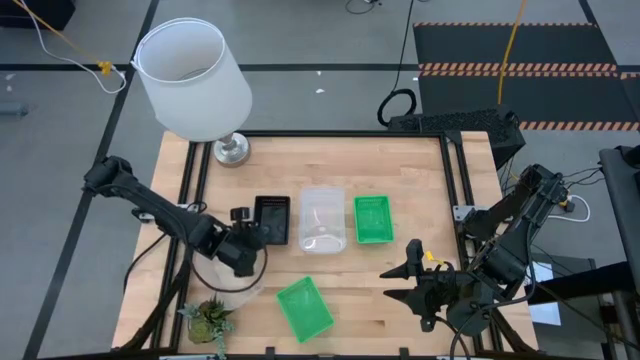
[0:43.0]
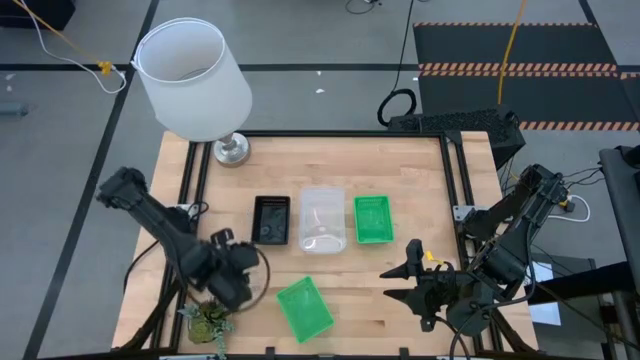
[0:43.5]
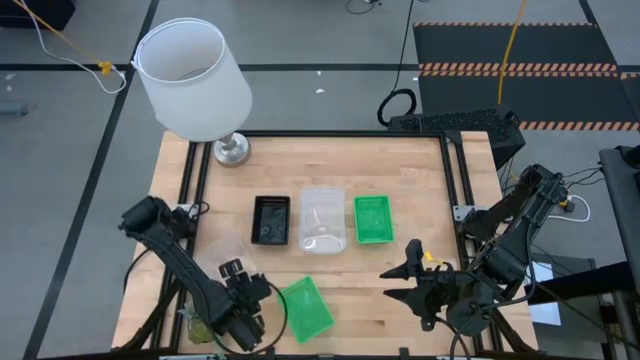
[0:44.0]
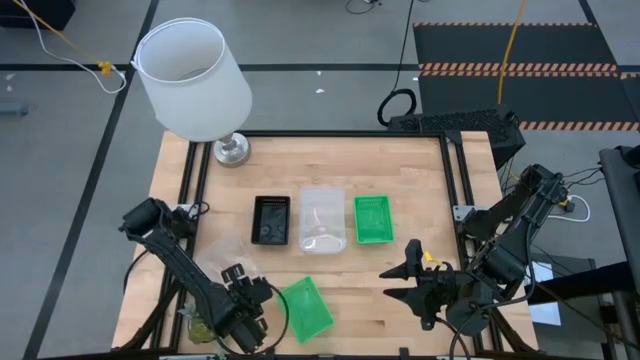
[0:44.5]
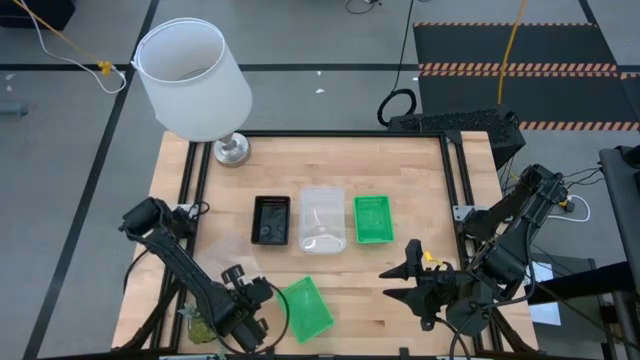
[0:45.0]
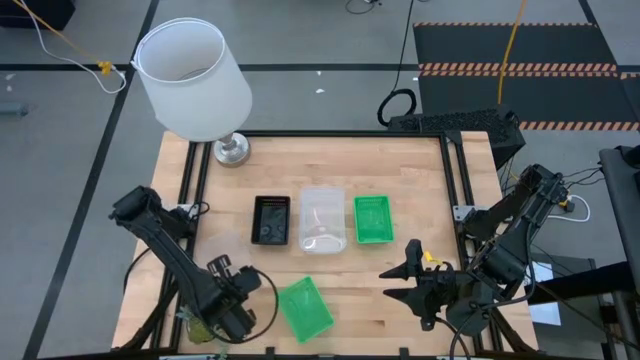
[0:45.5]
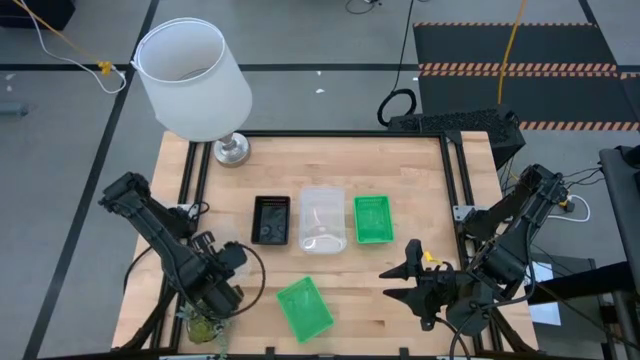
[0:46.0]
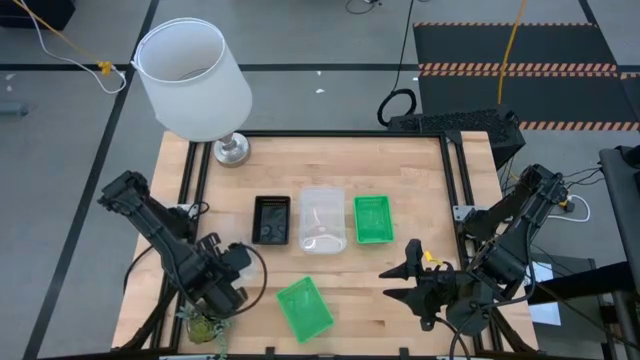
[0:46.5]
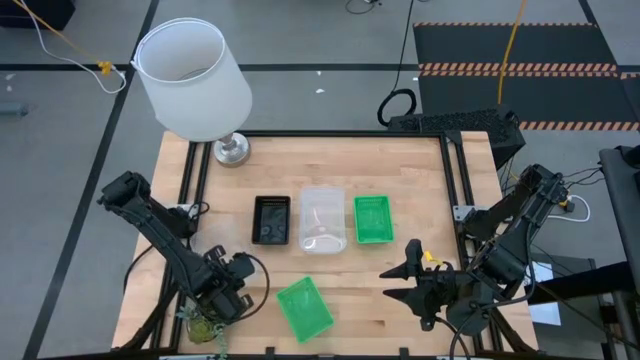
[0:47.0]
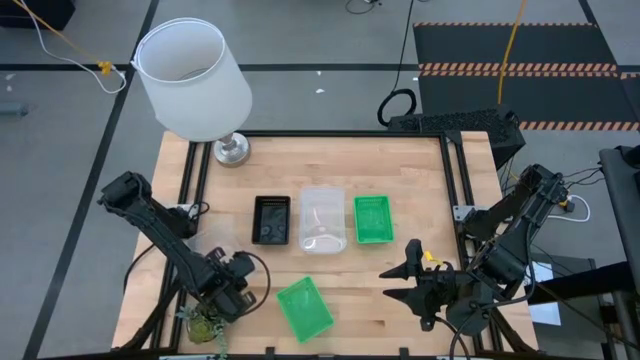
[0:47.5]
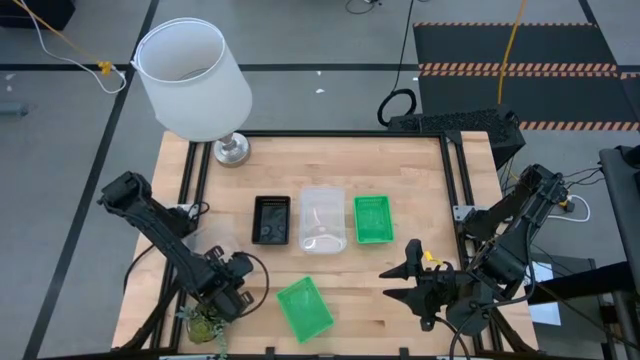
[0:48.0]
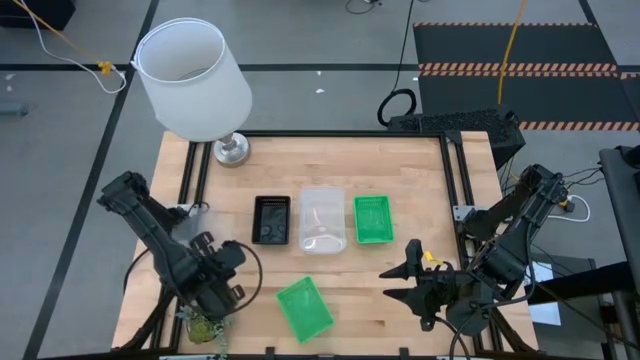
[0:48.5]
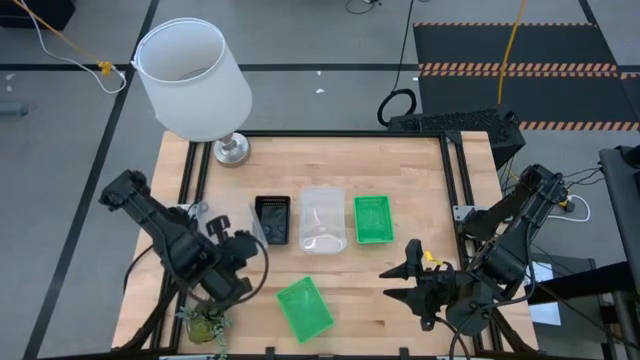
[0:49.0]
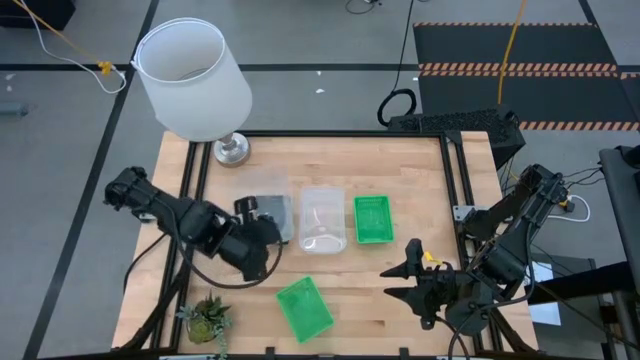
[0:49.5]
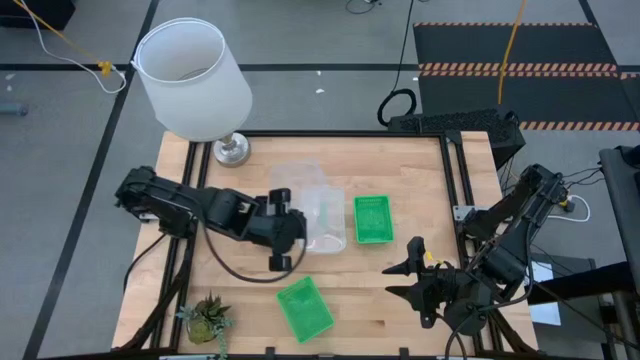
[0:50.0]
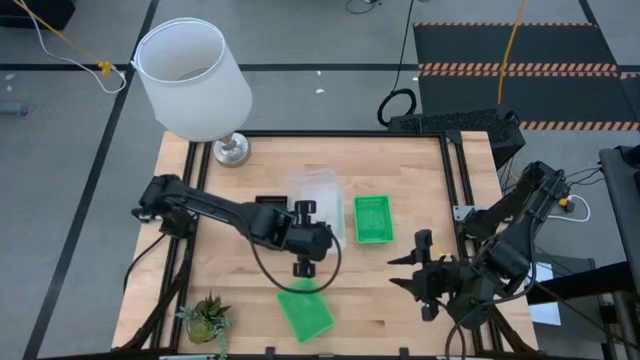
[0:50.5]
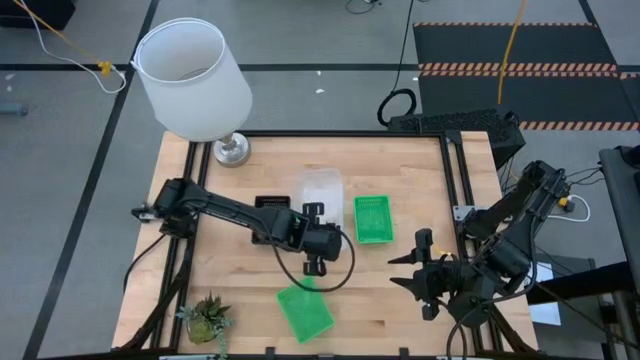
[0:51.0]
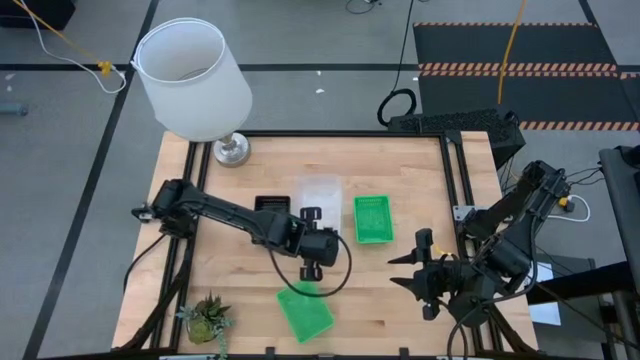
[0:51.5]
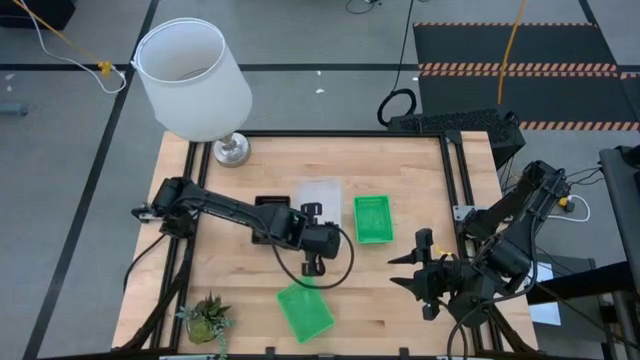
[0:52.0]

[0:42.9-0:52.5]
Stack the bottom transparent bin on the transparent bins

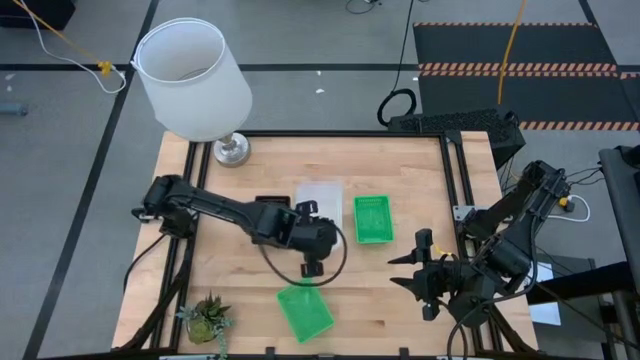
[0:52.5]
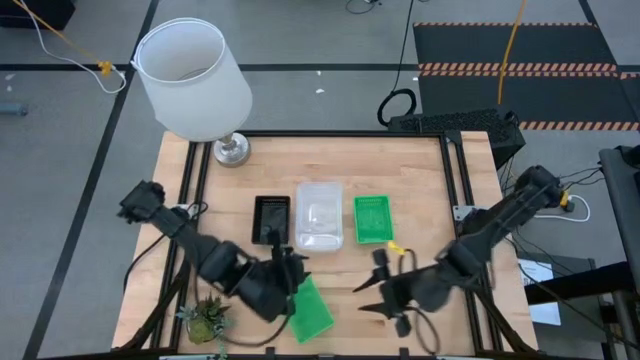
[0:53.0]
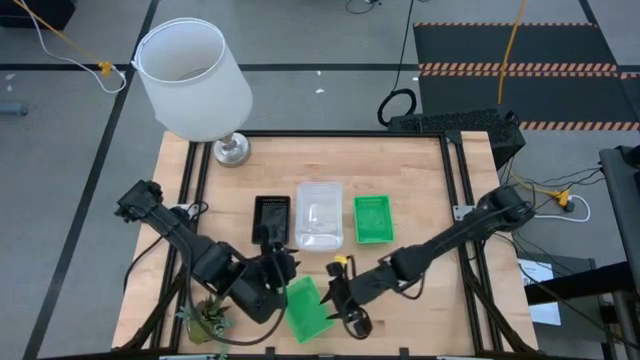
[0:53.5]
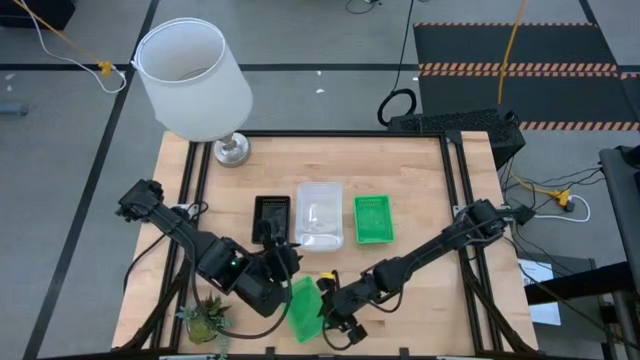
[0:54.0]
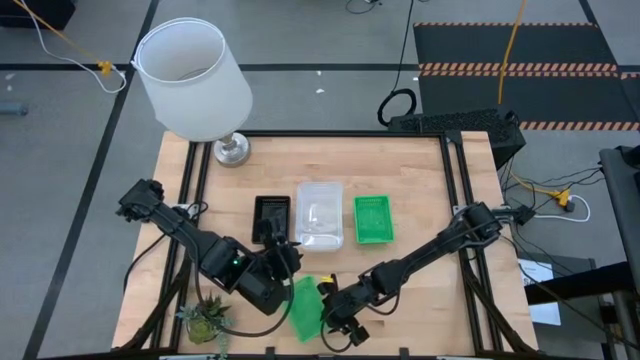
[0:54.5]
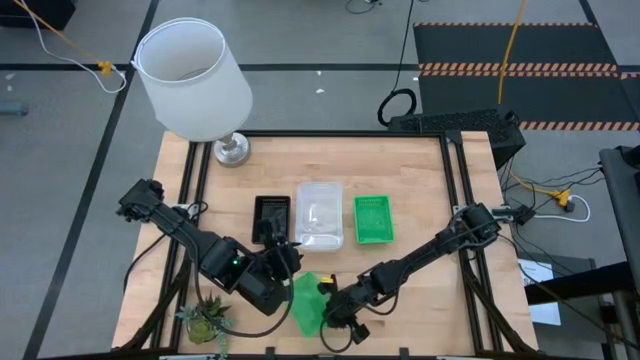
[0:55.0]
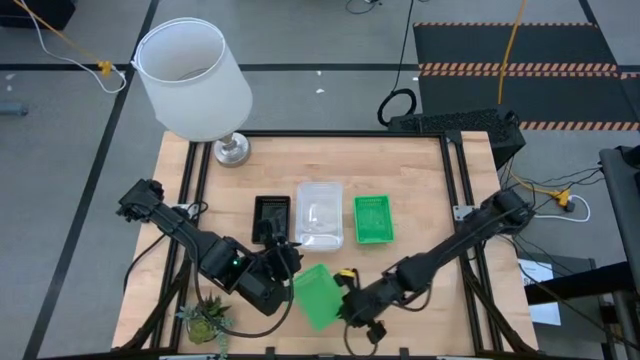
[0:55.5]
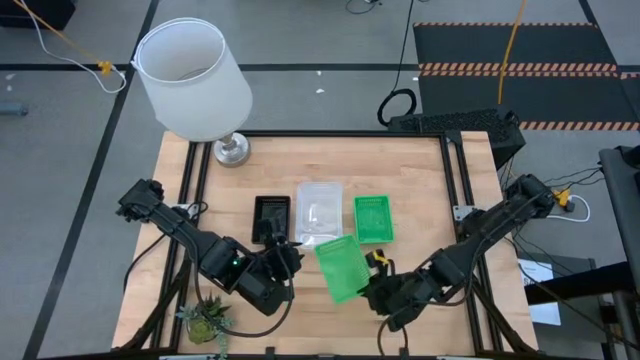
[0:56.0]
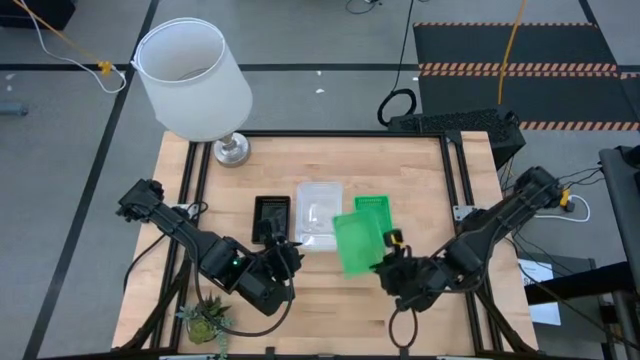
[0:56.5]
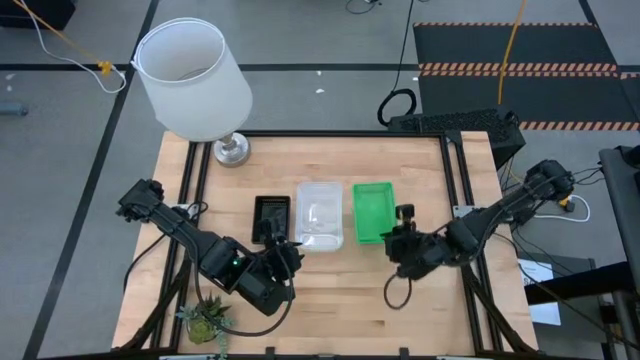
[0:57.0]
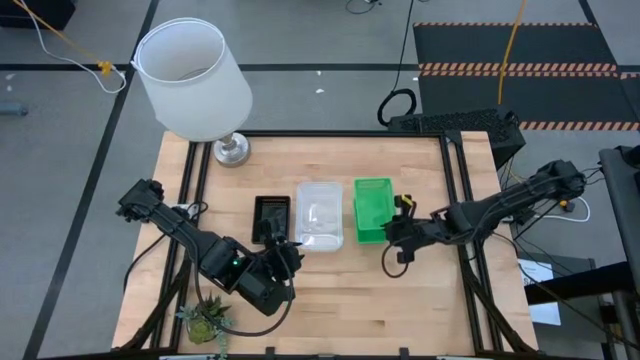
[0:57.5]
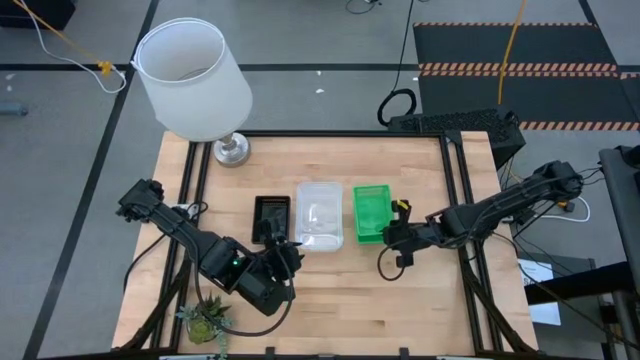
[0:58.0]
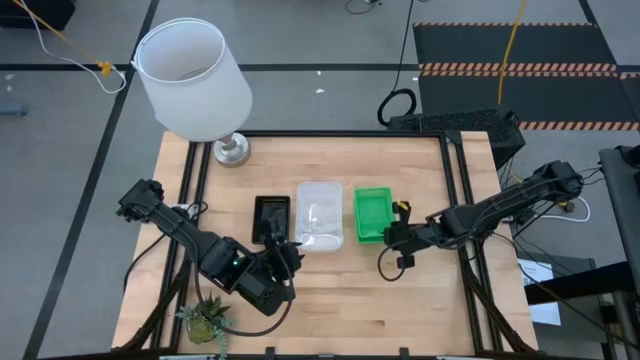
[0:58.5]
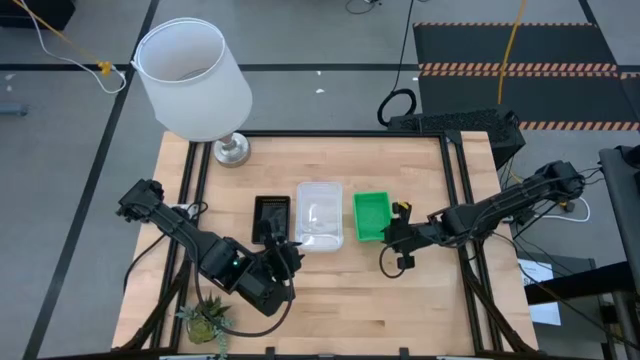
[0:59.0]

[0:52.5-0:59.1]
Stack the bottom green bin on the green bins
